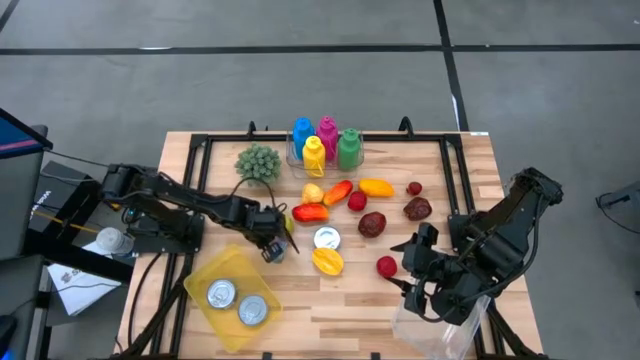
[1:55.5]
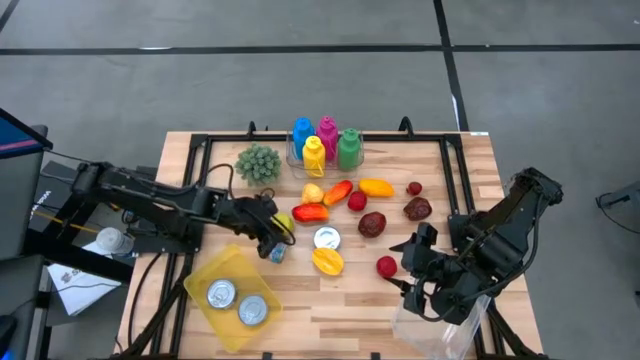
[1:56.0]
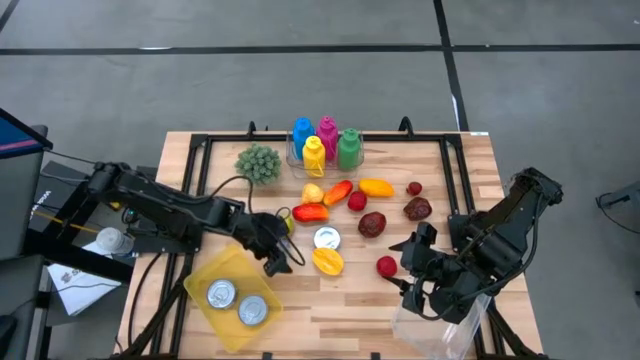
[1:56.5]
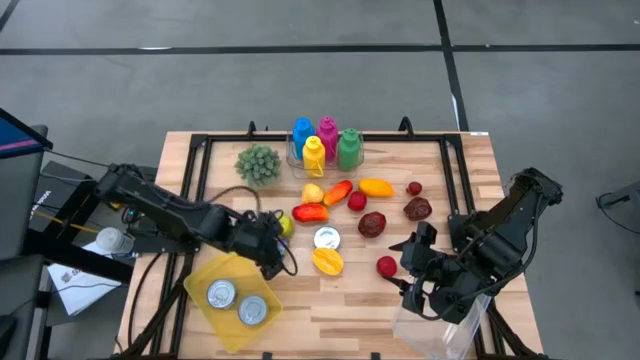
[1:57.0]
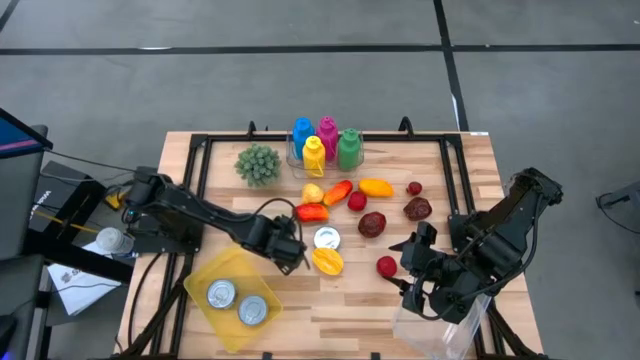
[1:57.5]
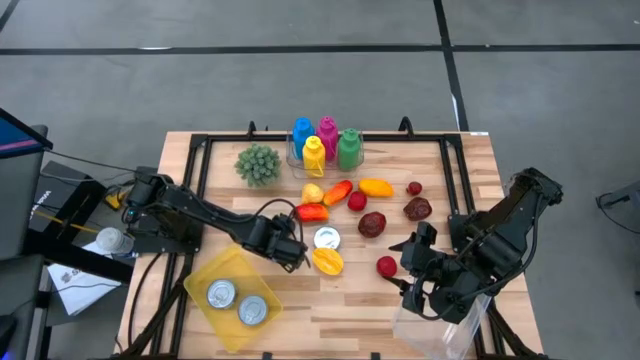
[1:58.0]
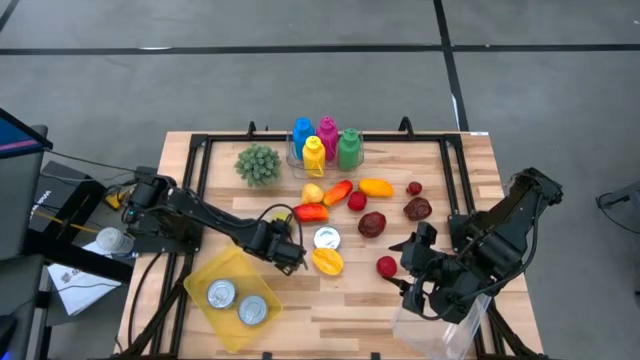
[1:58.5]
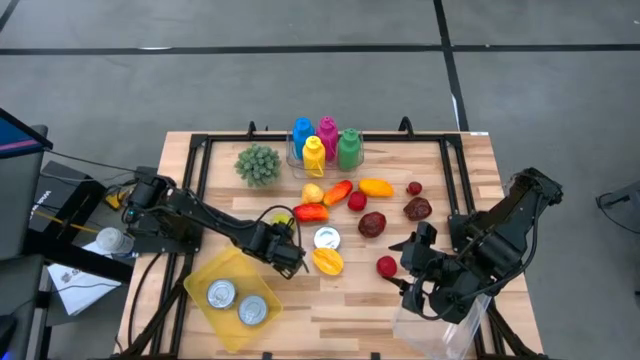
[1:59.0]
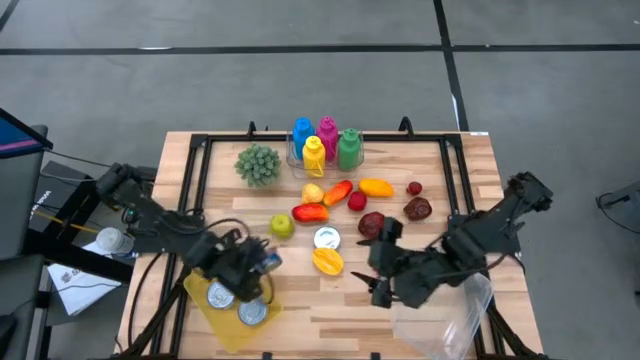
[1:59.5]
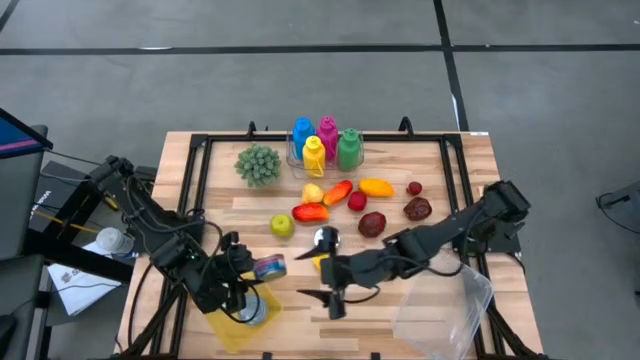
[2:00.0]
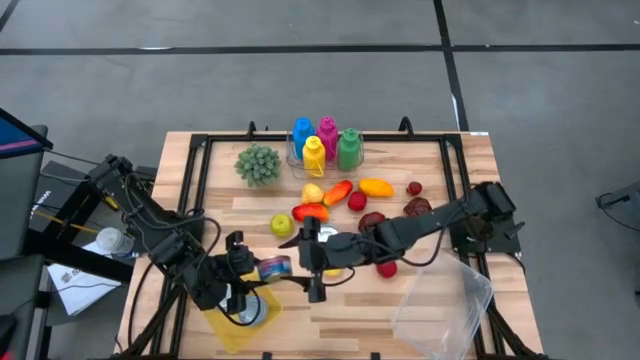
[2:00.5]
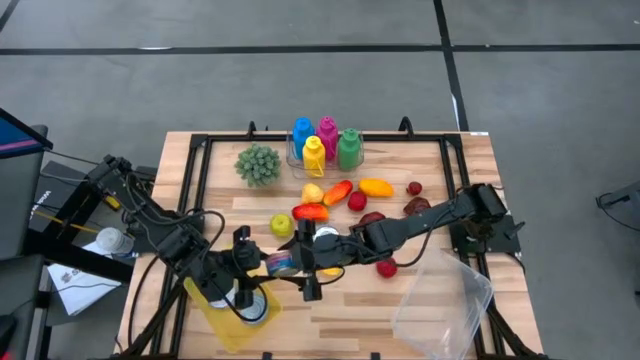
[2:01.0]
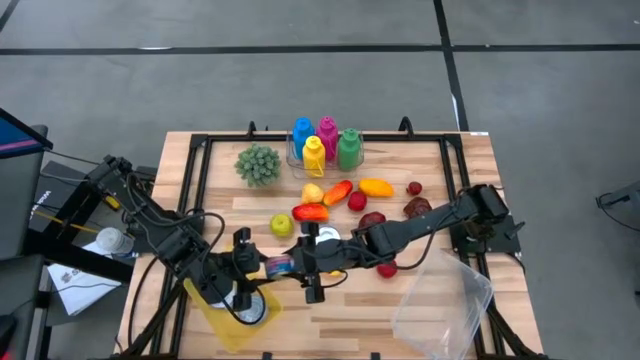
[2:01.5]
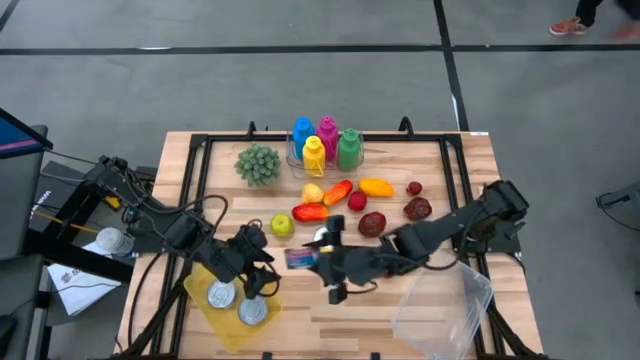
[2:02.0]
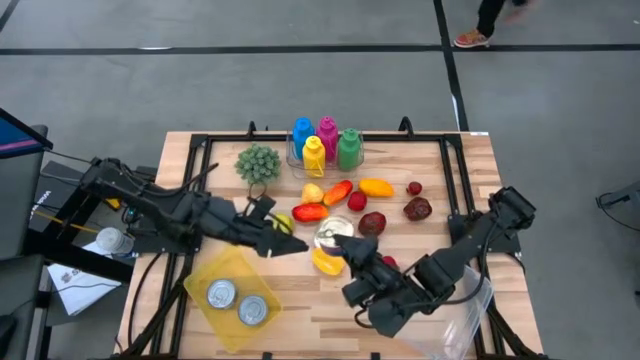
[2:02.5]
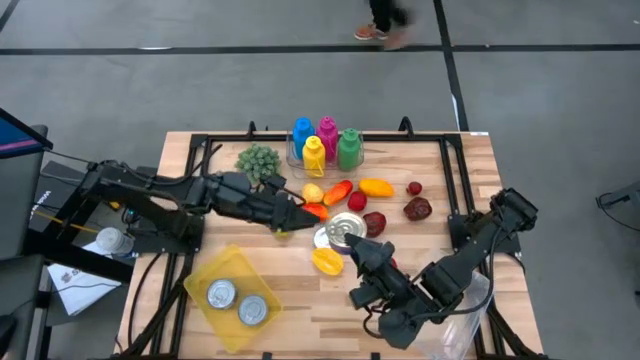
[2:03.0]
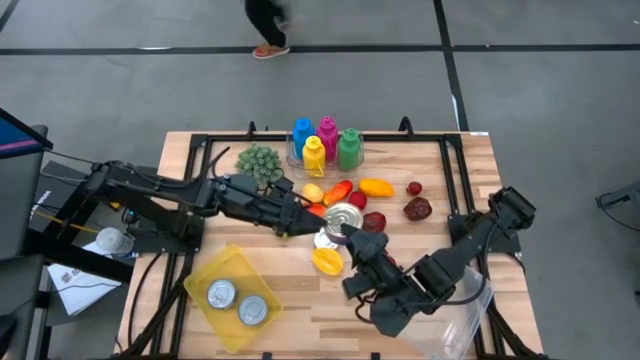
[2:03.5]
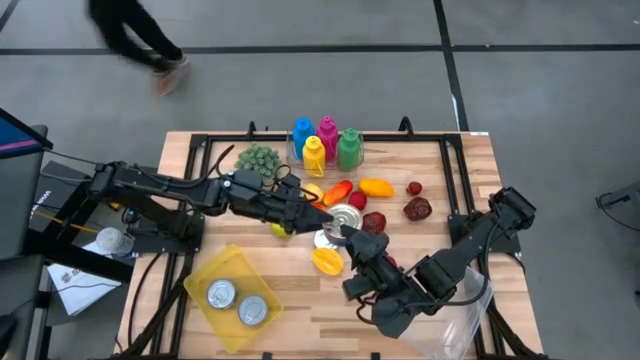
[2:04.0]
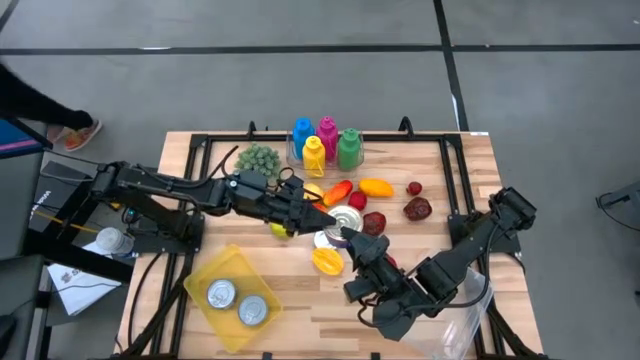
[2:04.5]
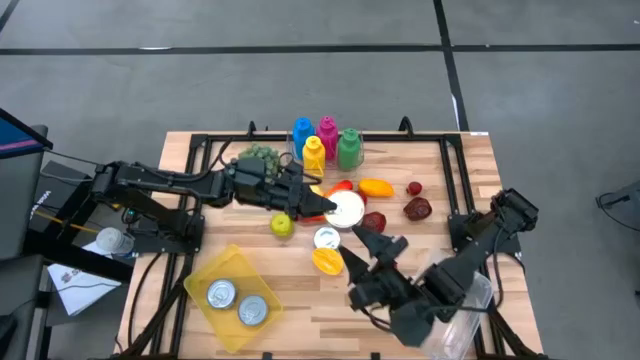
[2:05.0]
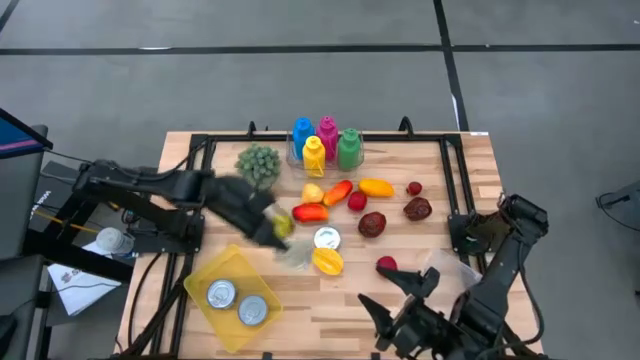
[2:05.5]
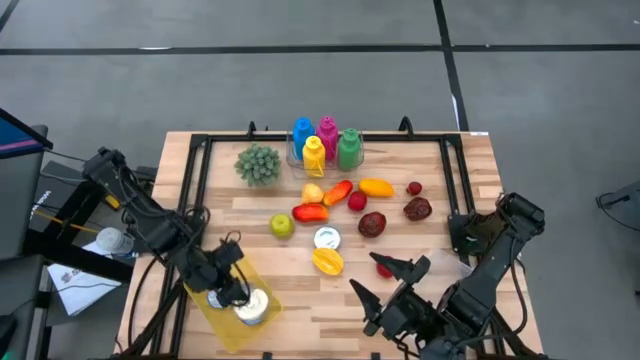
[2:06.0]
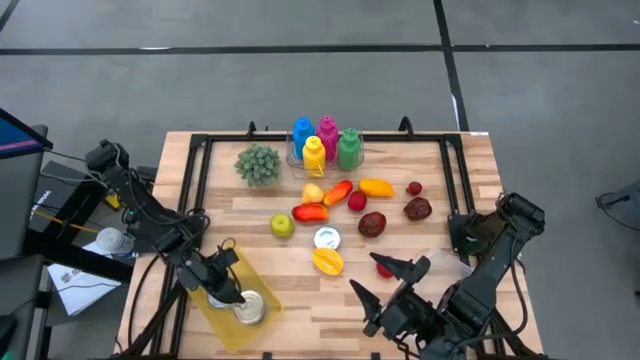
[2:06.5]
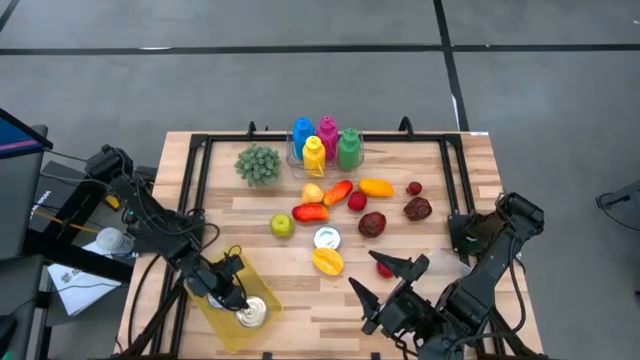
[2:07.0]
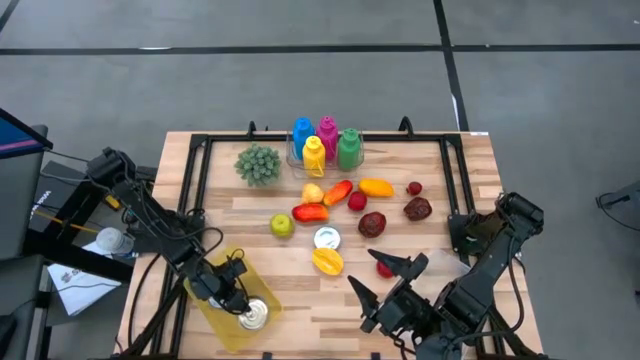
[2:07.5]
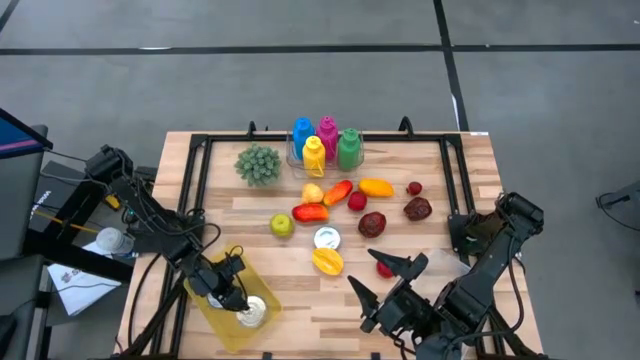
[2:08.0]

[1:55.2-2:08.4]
Task: Pick & Place Food Item
Put the blue and pink tuna can into the yellow bin

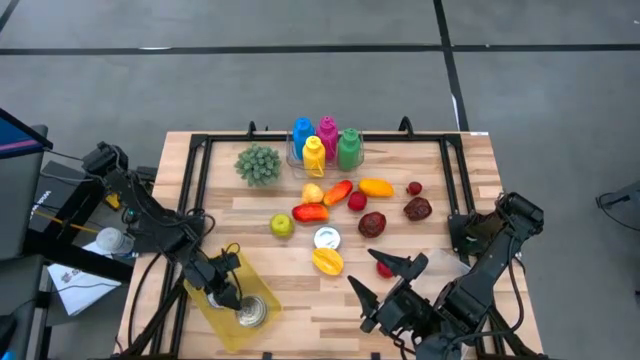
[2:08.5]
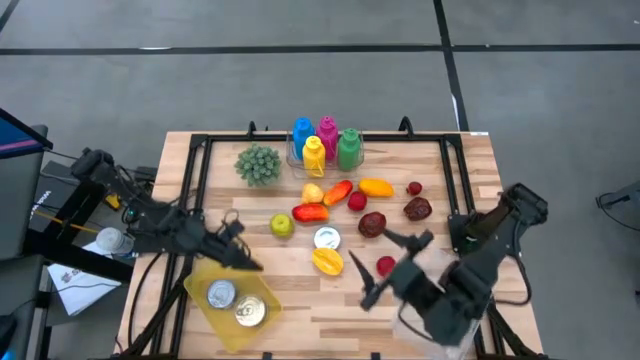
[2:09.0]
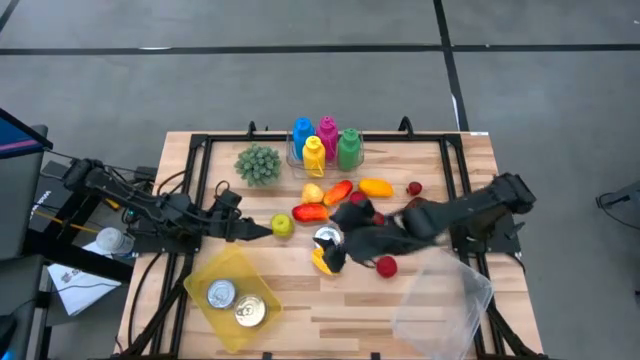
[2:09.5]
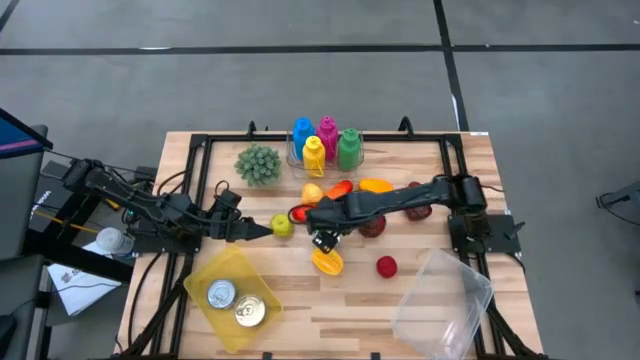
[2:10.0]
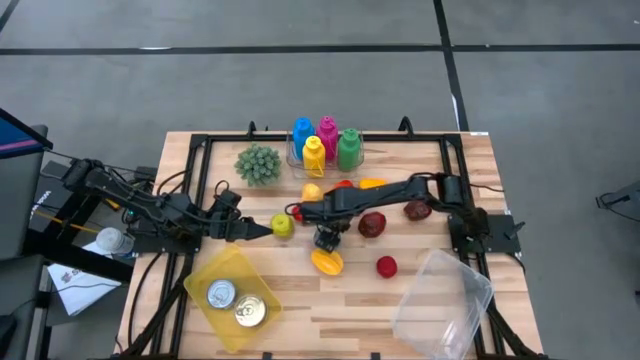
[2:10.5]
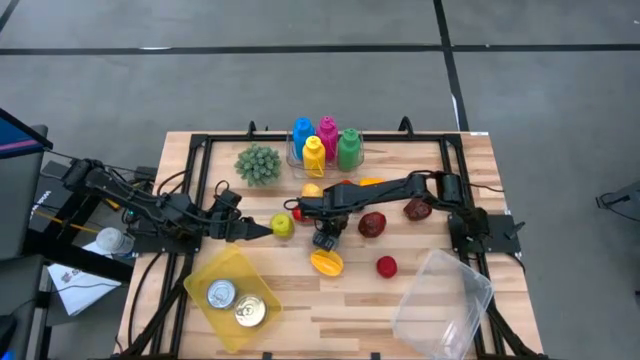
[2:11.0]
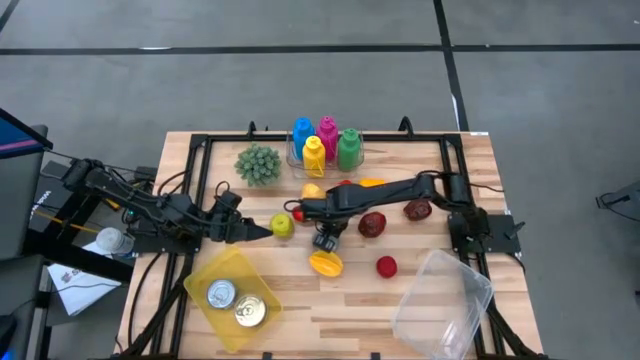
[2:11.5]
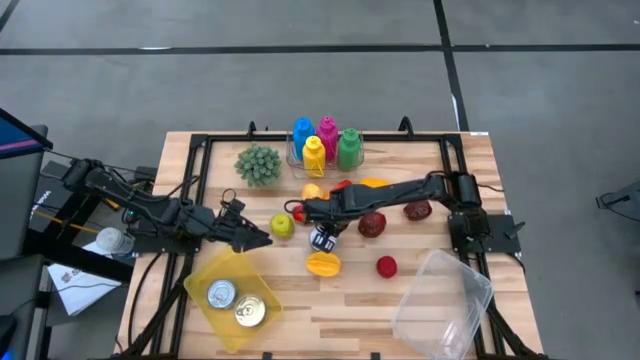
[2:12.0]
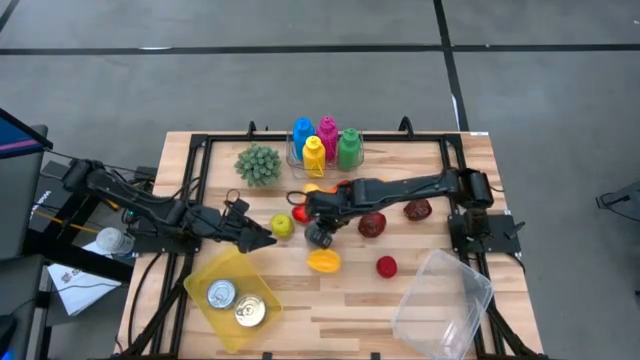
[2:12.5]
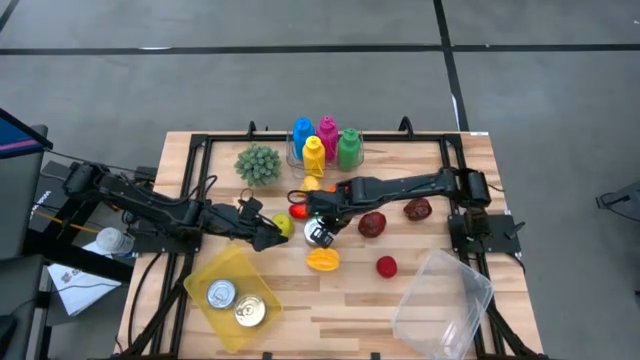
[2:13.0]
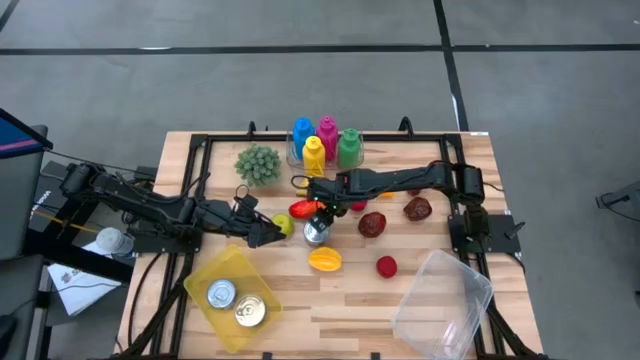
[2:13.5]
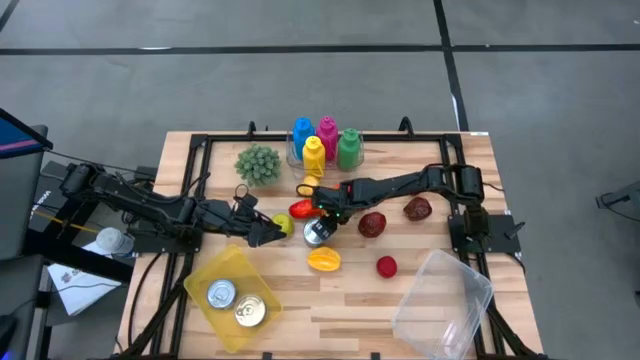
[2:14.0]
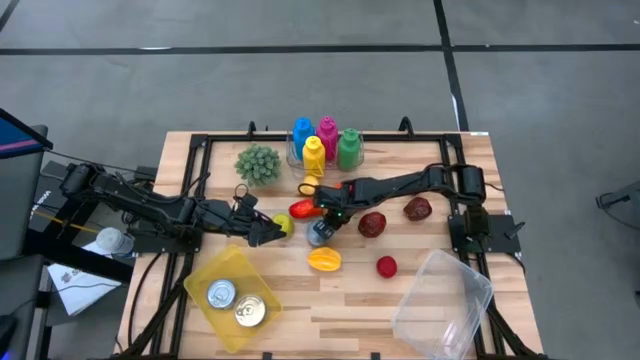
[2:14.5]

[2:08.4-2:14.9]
Put the green tuna can into the yellow bin

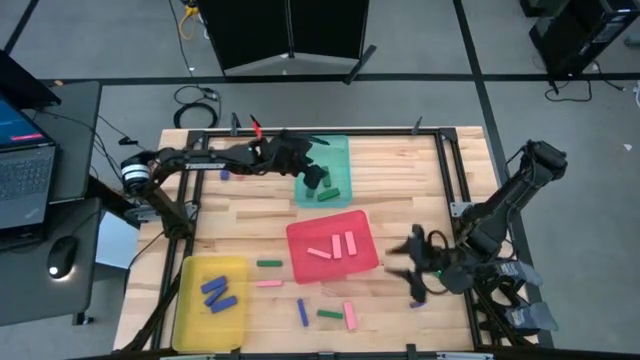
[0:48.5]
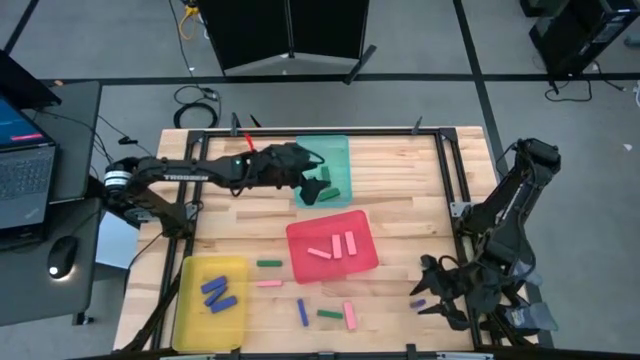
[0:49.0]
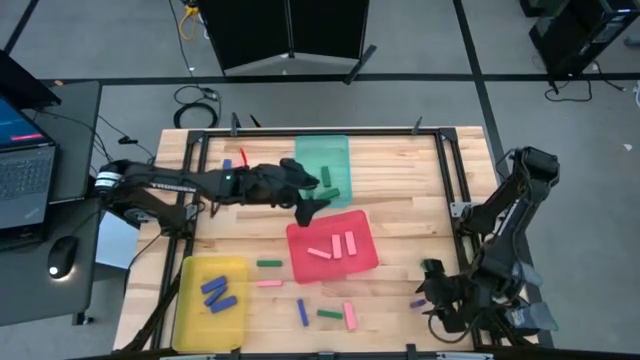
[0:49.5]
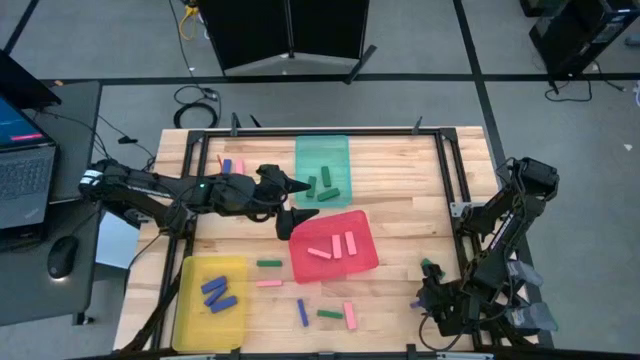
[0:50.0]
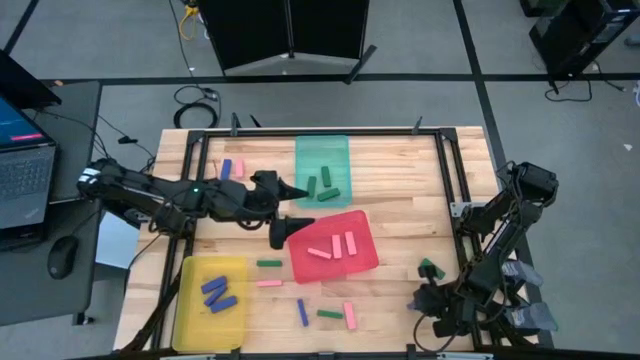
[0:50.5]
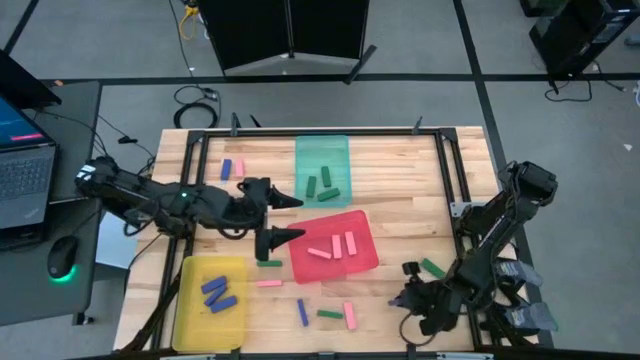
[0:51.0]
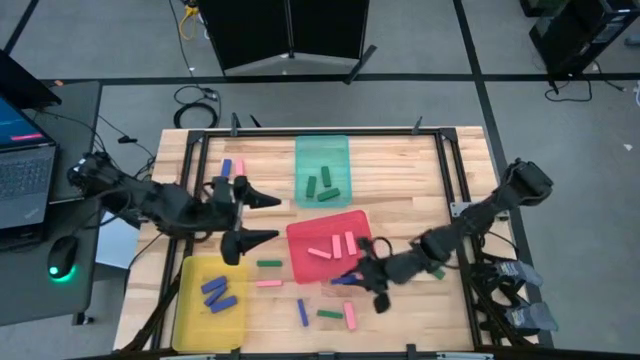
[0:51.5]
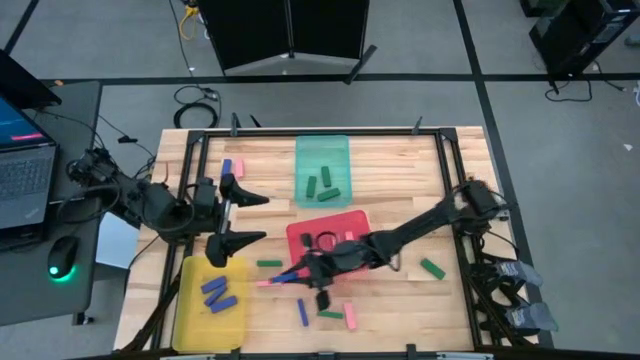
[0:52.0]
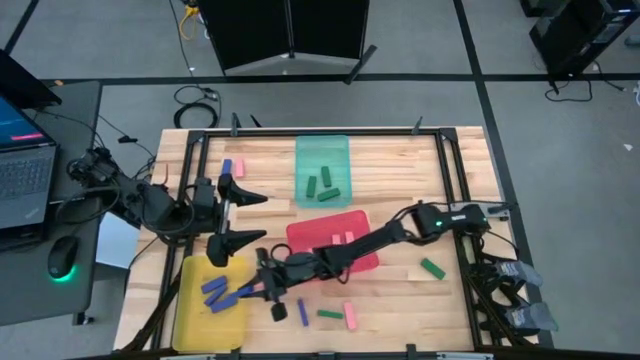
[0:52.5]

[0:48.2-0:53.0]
Task: Sort blocks
Put the blue block into the yellow bin
